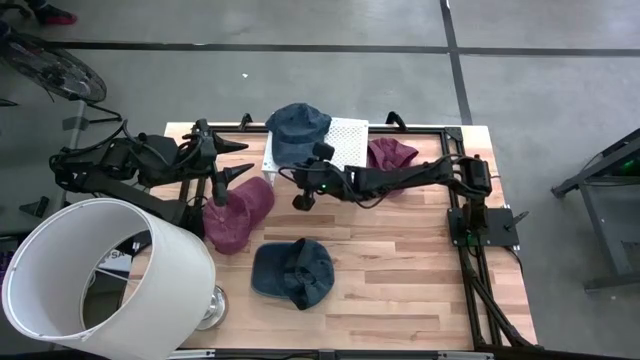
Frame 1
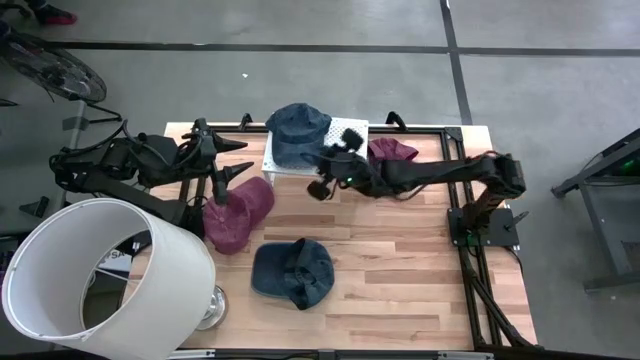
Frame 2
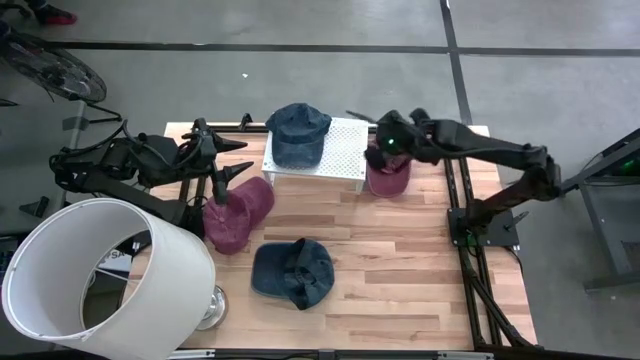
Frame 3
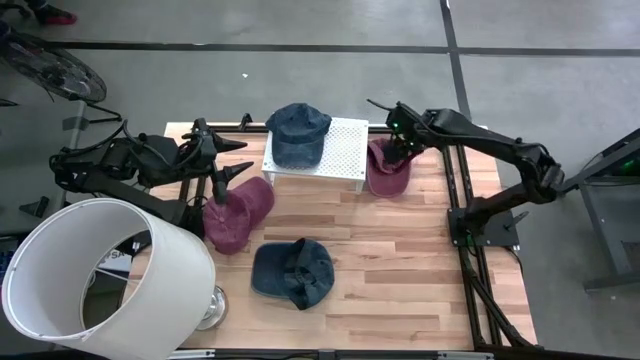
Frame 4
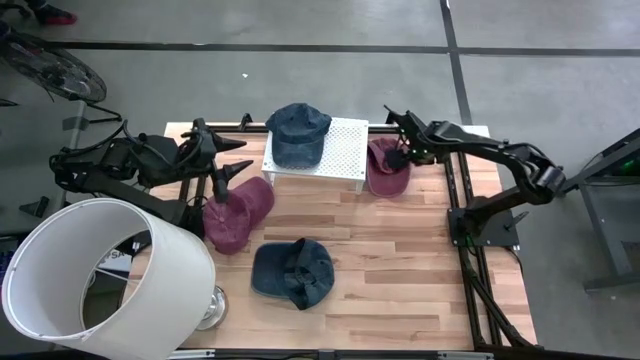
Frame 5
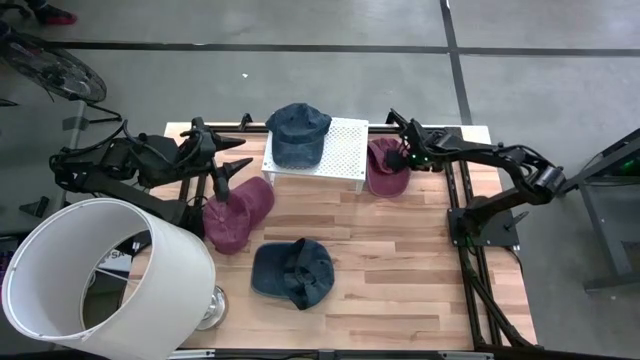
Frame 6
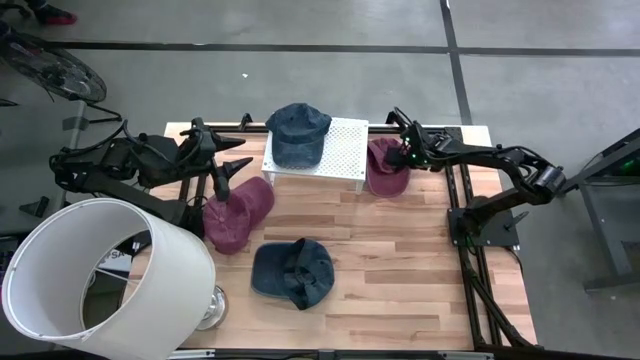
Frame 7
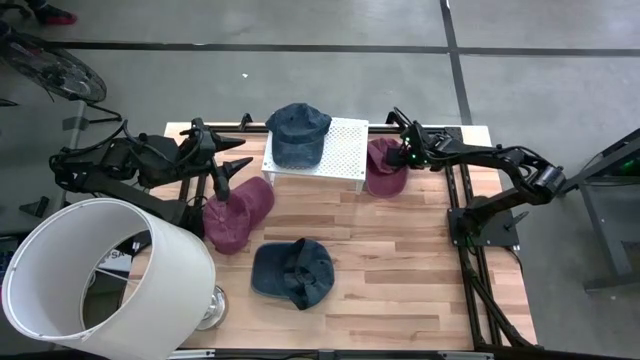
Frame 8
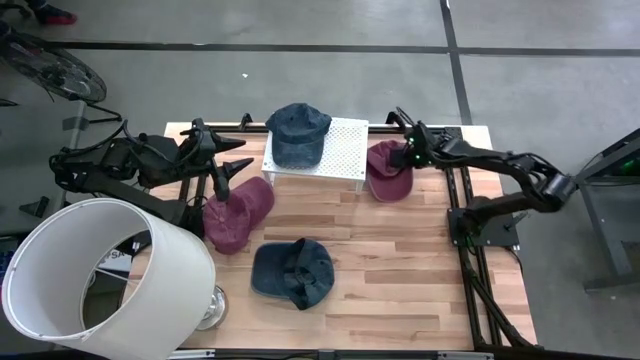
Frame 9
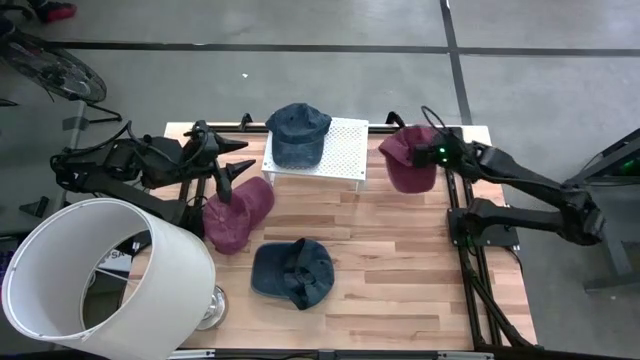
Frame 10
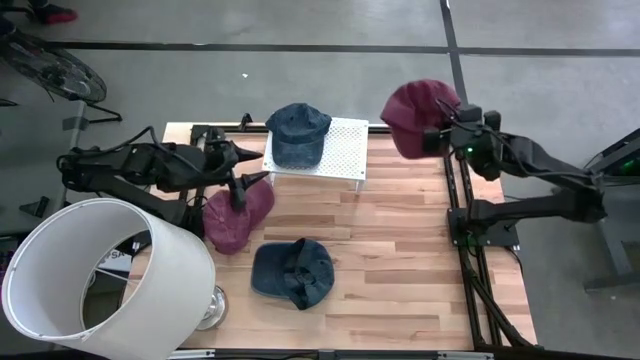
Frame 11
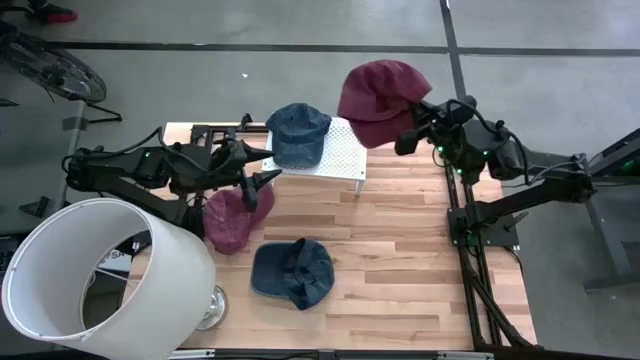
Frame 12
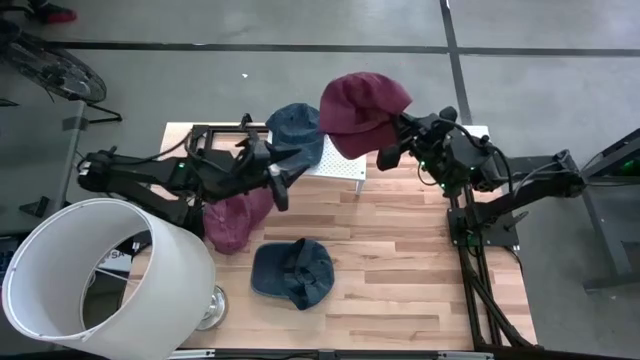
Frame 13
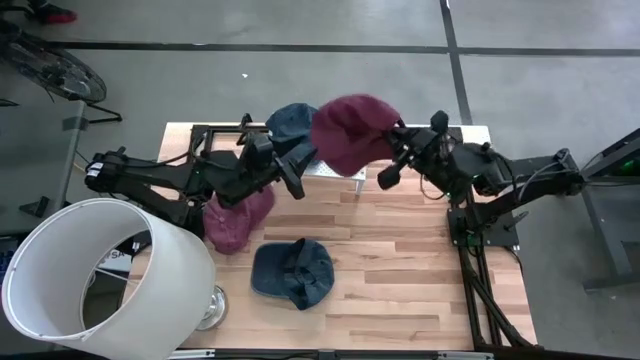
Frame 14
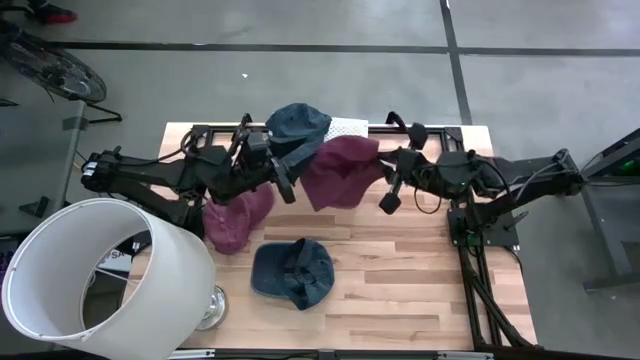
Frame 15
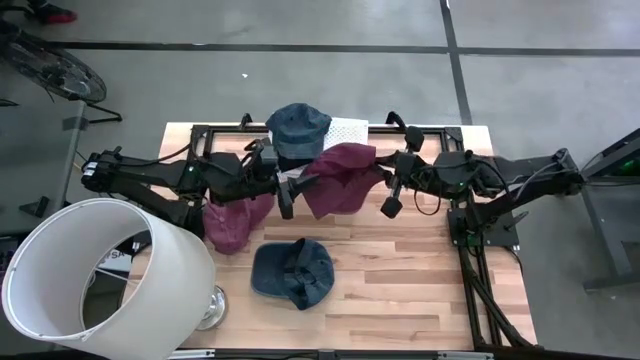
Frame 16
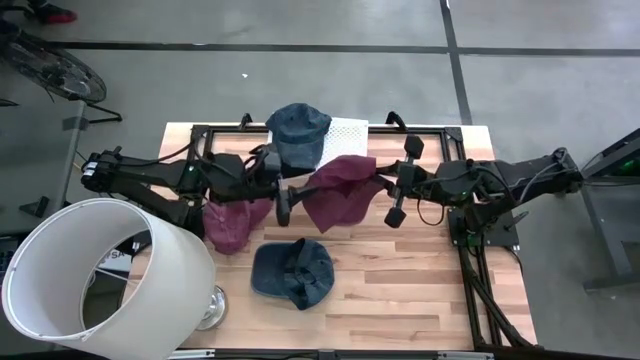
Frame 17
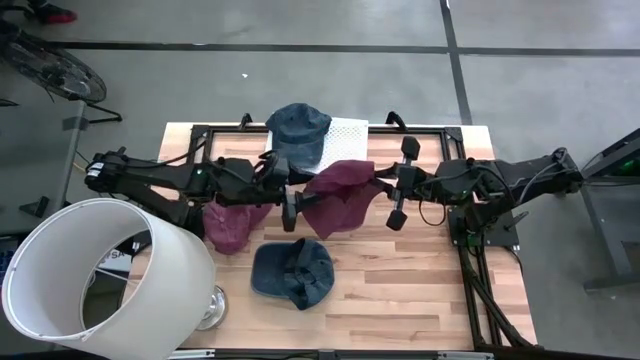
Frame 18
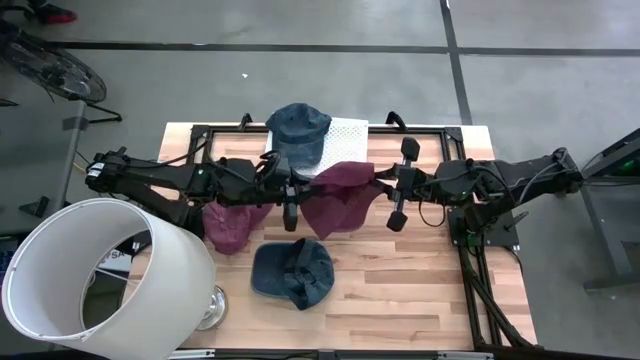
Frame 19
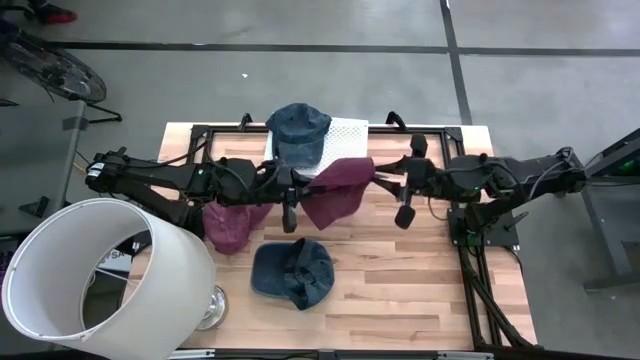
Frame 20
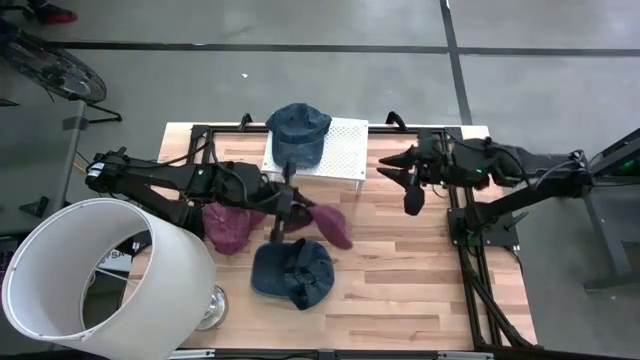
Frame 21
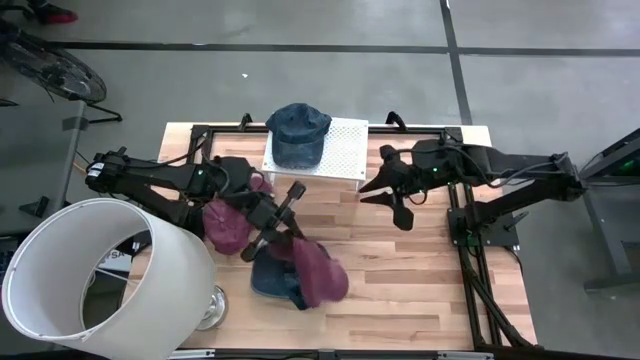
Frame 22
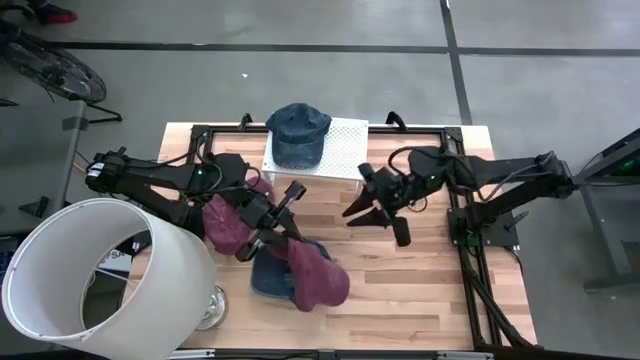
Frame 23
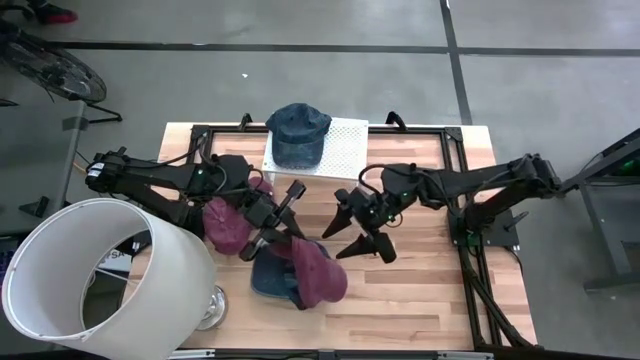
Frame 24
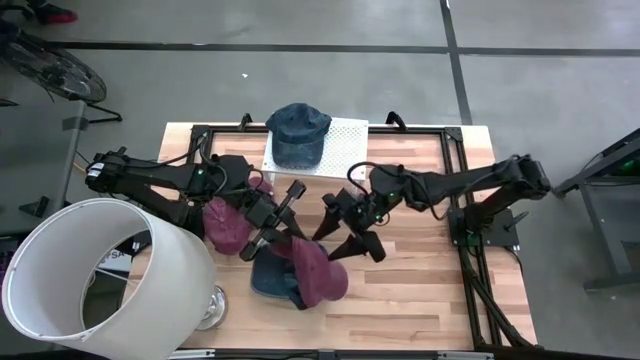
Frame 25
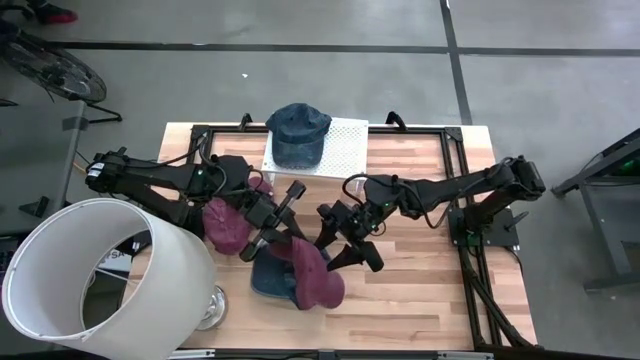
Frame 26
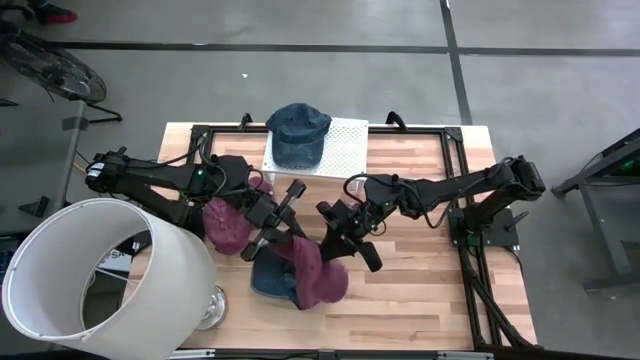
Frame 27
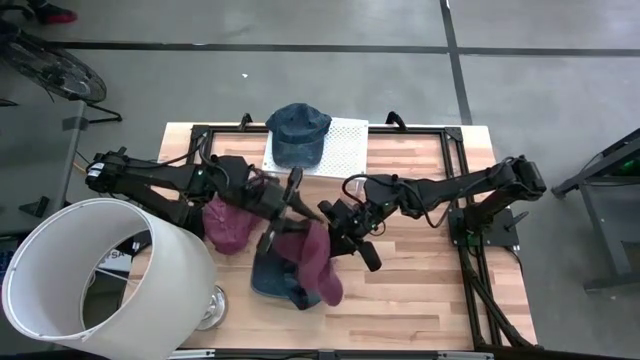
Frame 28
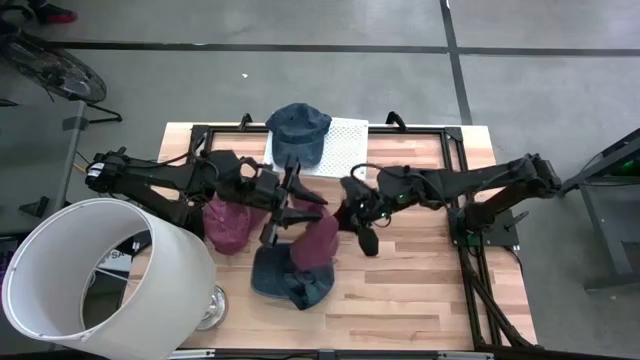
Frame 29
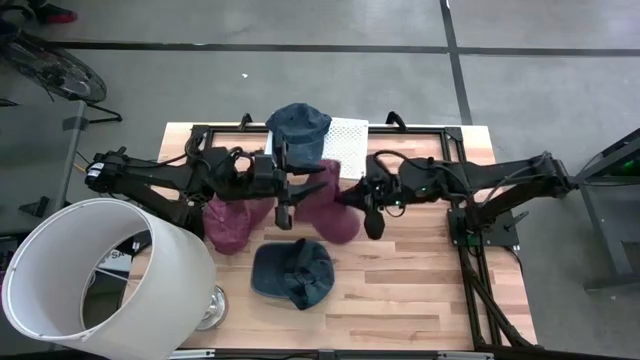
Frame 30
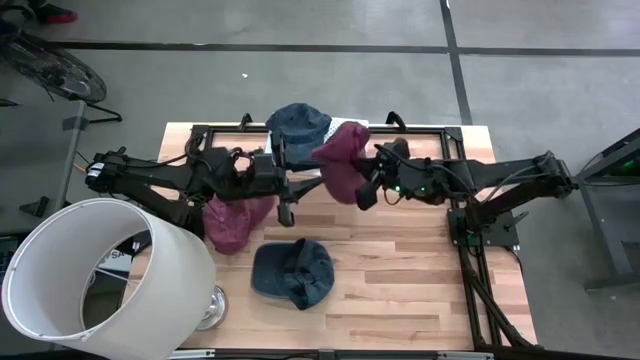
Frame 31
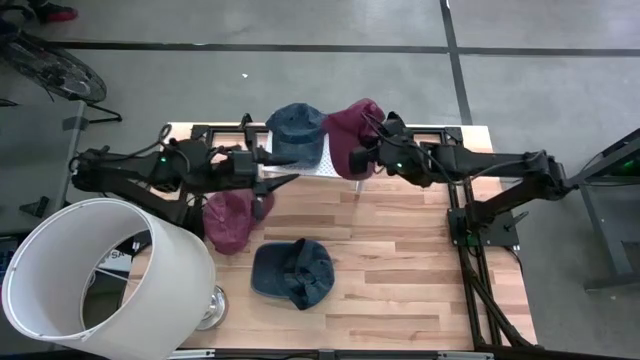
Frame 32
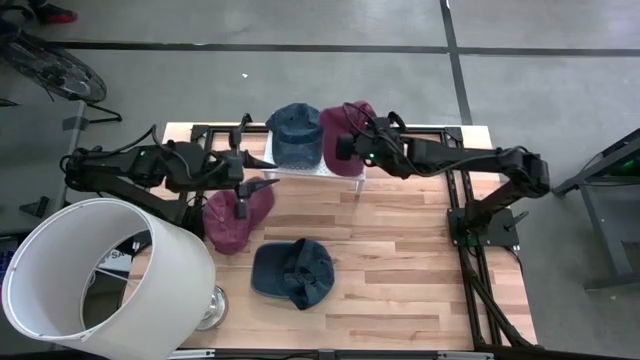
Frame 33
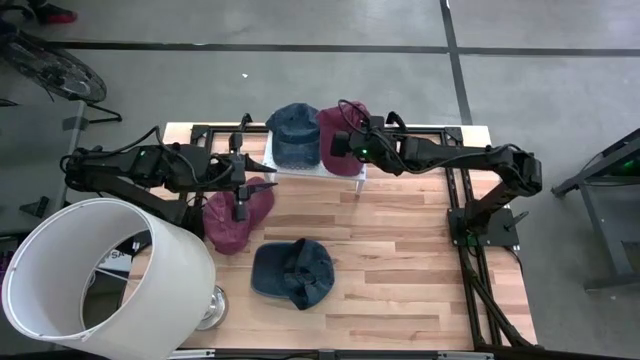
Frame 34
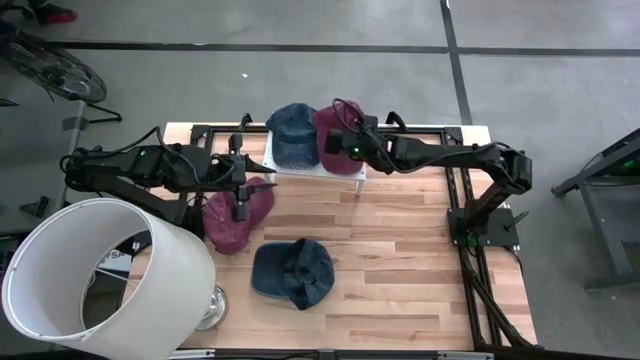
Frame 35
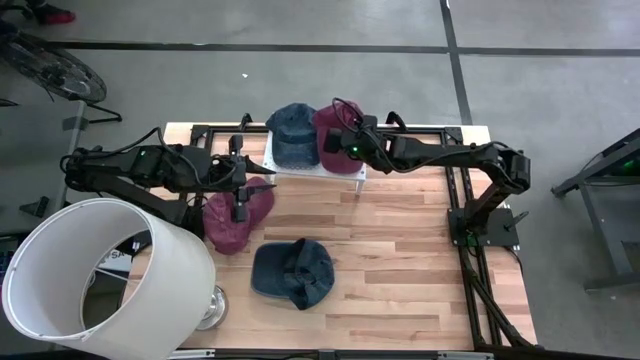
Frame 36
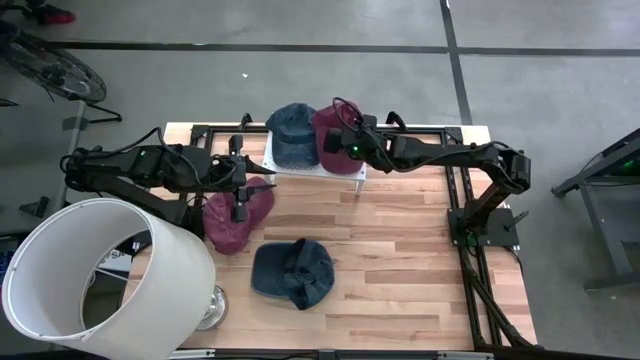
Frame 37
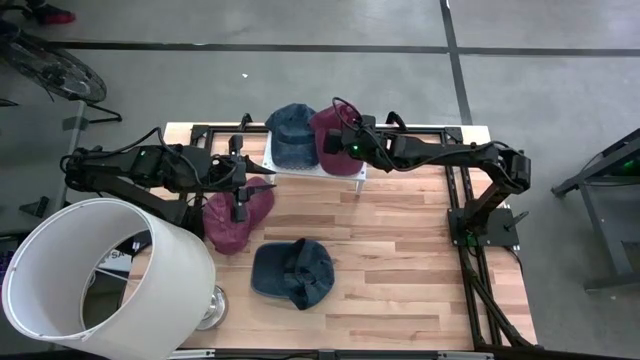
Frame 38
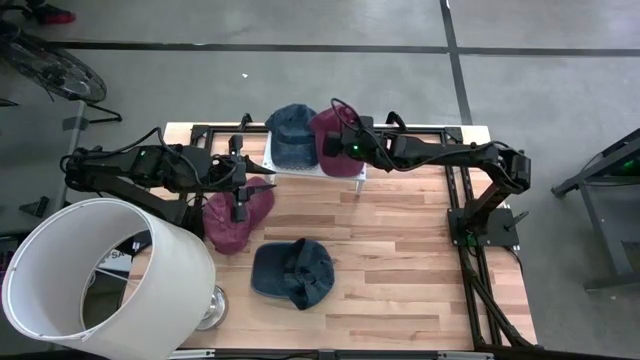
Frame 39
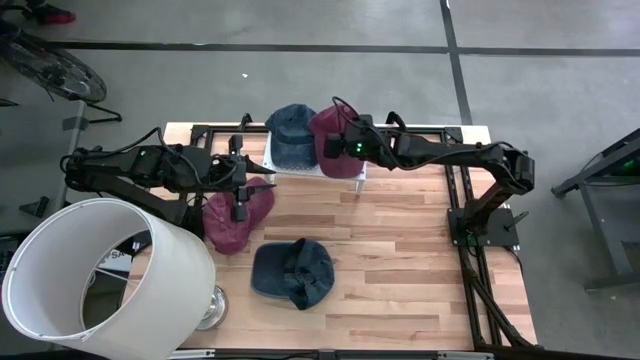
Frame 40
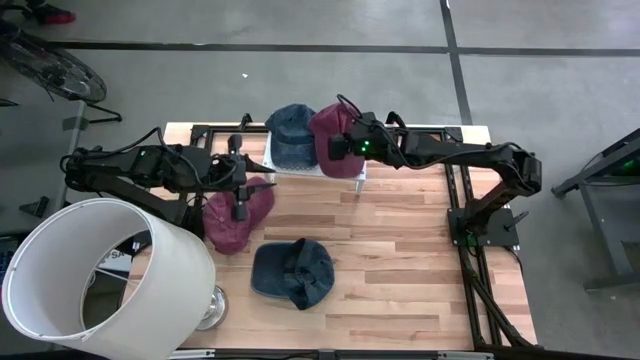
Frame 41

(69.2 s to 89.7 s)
Task: Pick & Place hat
Put the right dark red cap into the shelf
